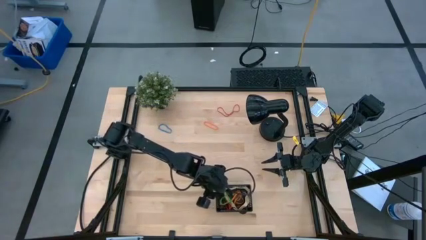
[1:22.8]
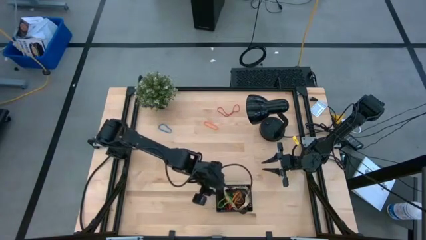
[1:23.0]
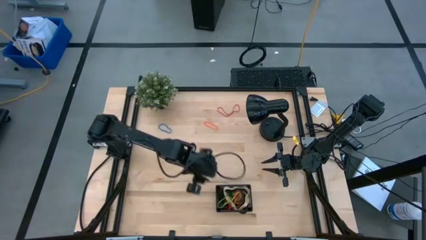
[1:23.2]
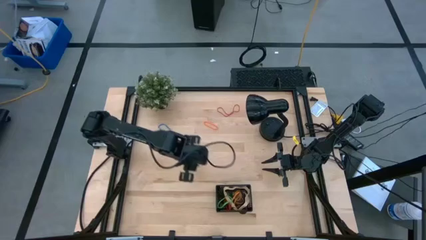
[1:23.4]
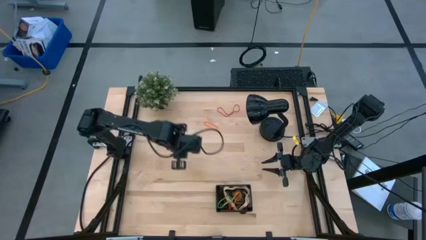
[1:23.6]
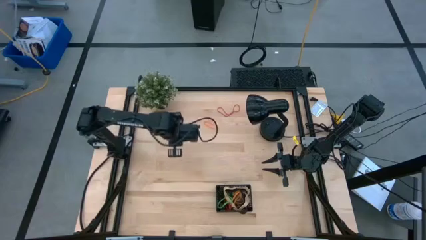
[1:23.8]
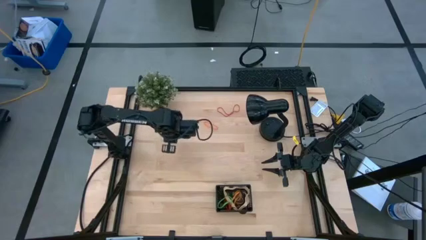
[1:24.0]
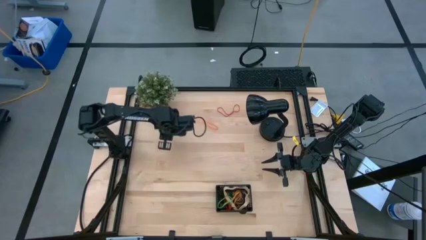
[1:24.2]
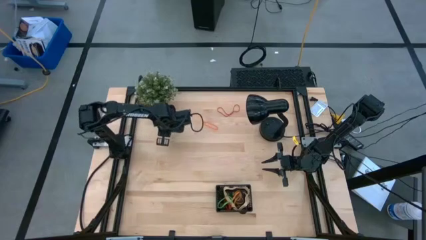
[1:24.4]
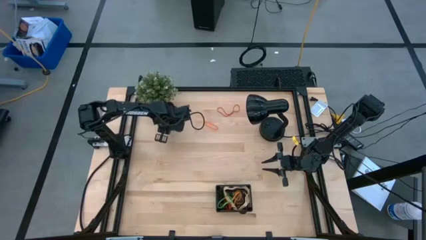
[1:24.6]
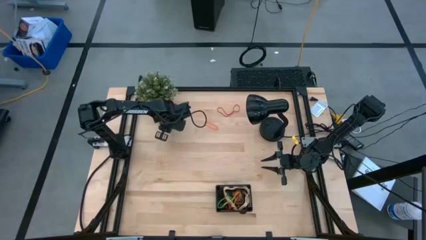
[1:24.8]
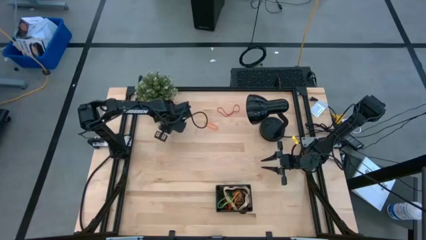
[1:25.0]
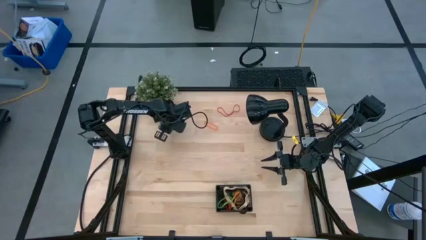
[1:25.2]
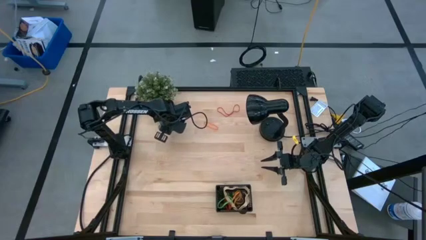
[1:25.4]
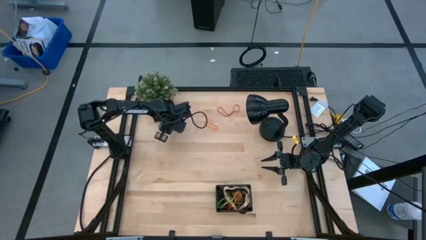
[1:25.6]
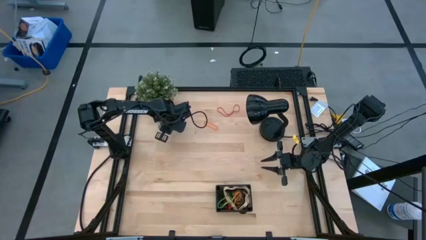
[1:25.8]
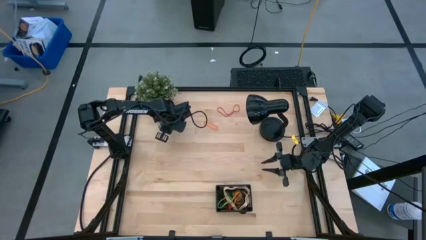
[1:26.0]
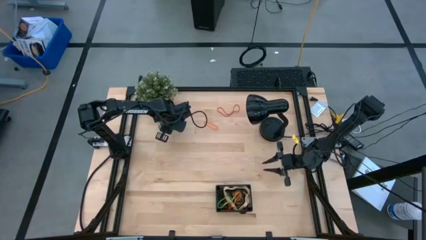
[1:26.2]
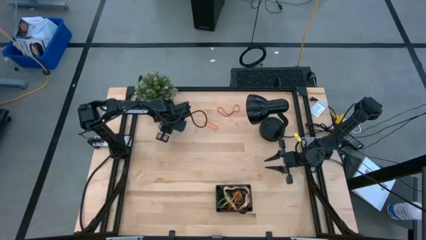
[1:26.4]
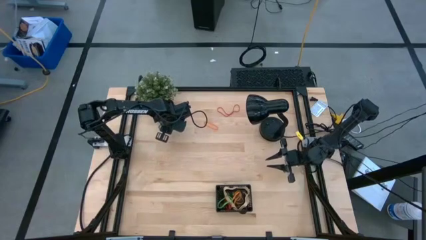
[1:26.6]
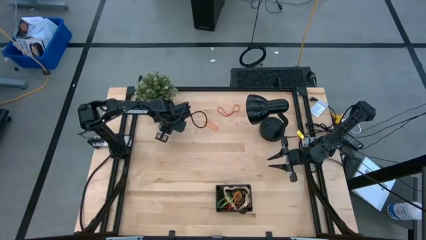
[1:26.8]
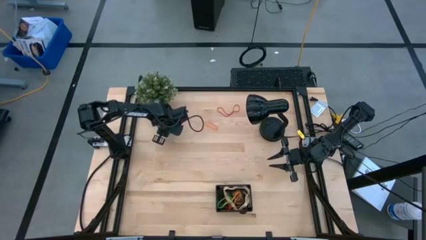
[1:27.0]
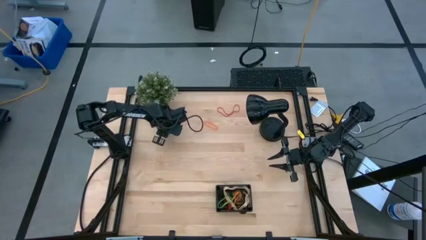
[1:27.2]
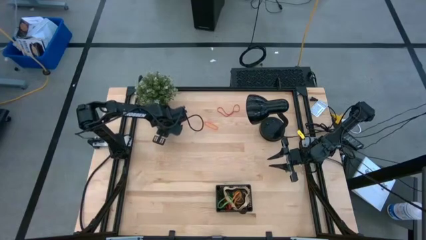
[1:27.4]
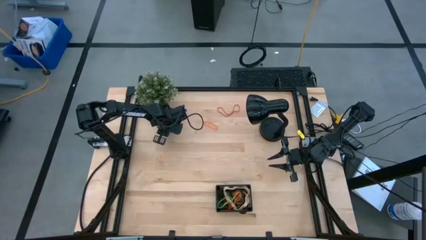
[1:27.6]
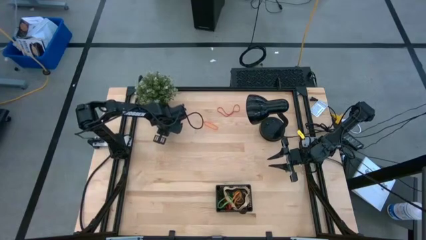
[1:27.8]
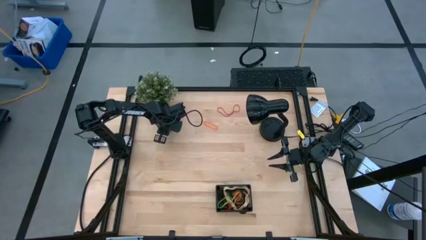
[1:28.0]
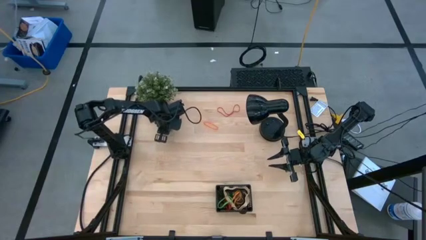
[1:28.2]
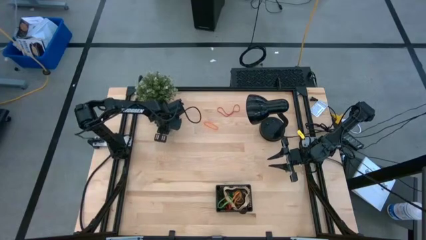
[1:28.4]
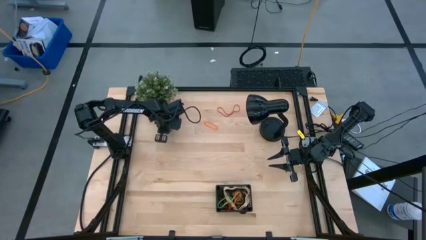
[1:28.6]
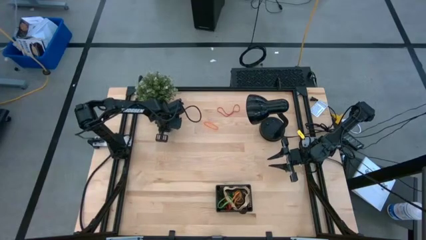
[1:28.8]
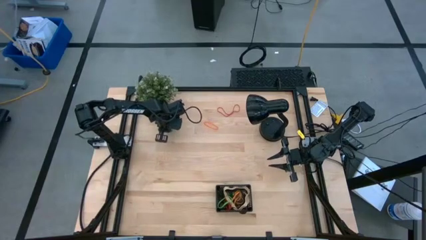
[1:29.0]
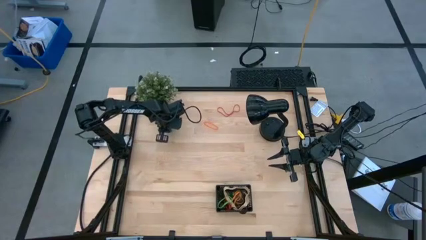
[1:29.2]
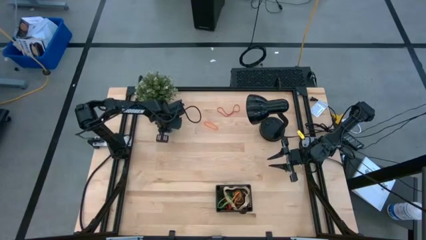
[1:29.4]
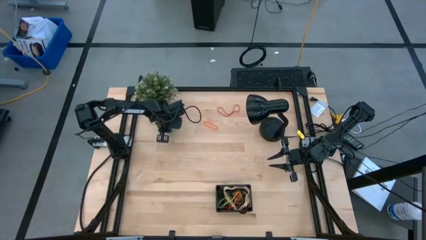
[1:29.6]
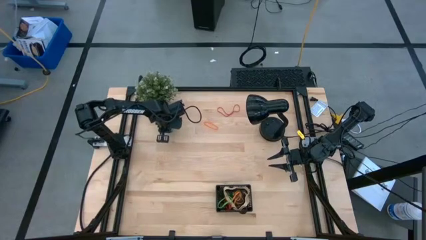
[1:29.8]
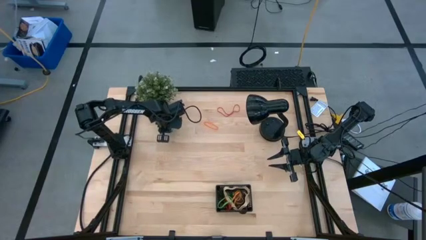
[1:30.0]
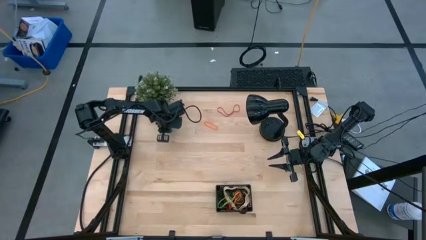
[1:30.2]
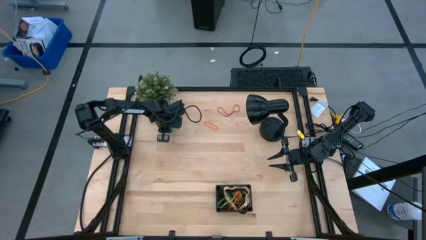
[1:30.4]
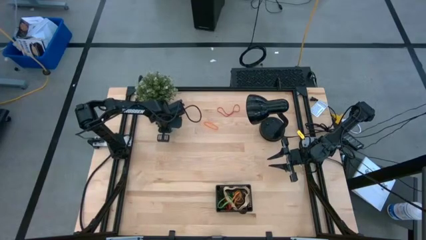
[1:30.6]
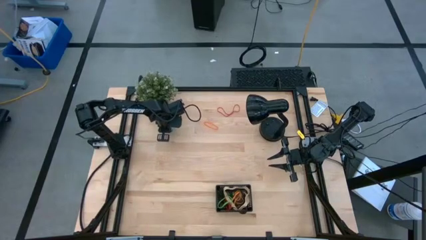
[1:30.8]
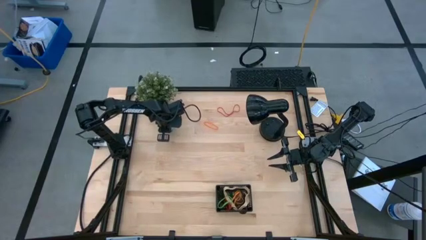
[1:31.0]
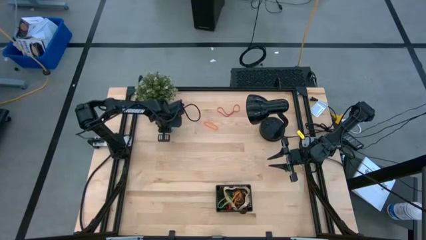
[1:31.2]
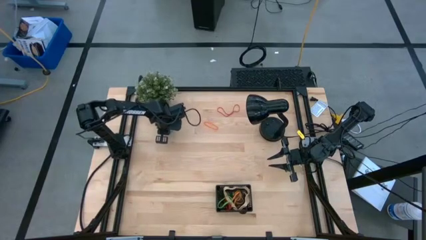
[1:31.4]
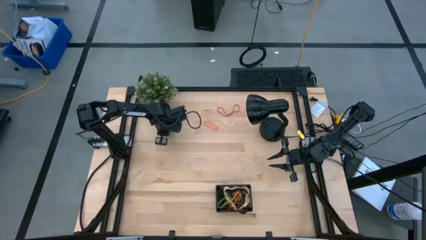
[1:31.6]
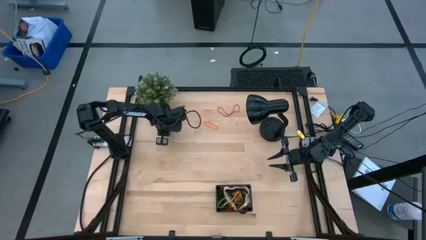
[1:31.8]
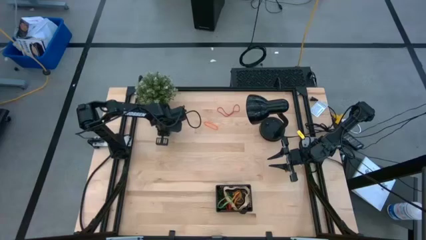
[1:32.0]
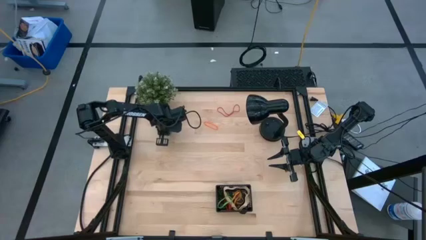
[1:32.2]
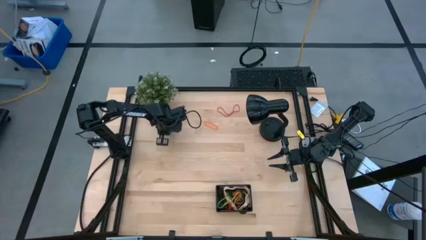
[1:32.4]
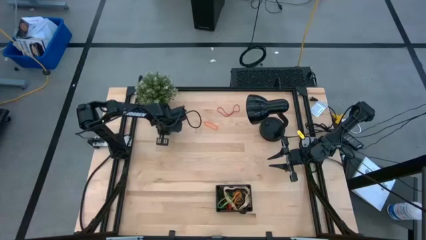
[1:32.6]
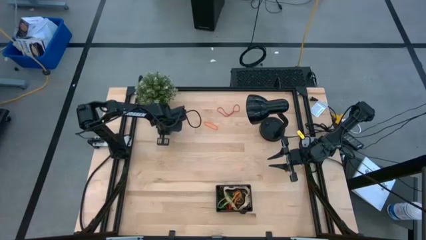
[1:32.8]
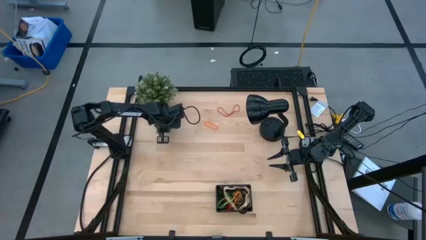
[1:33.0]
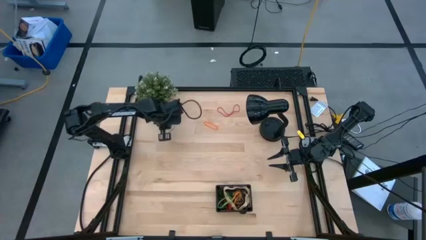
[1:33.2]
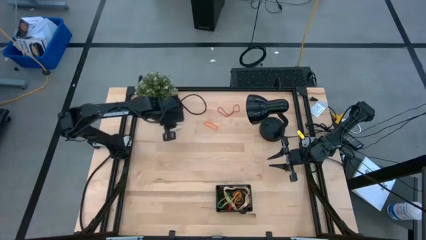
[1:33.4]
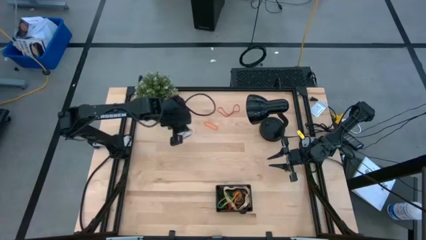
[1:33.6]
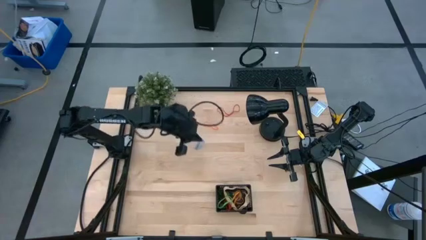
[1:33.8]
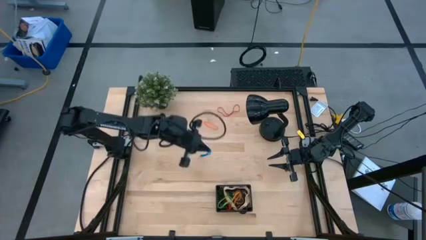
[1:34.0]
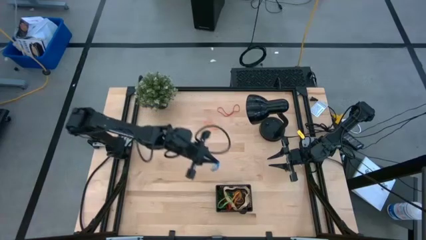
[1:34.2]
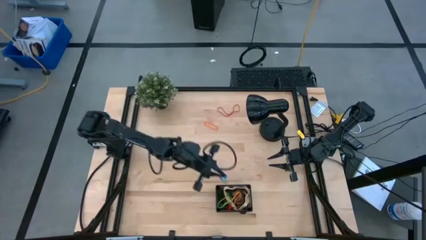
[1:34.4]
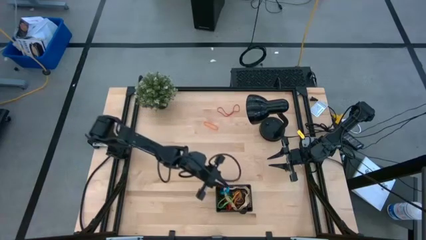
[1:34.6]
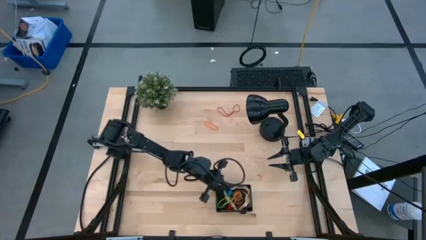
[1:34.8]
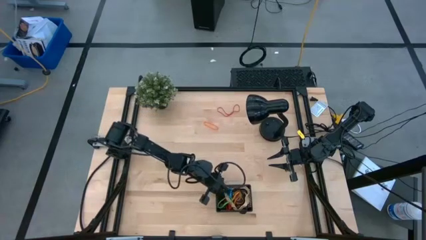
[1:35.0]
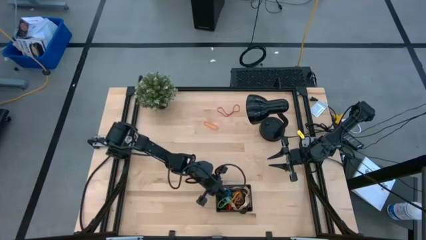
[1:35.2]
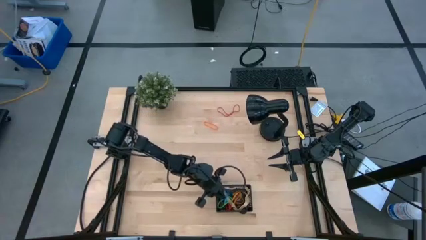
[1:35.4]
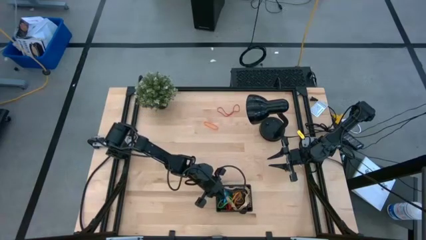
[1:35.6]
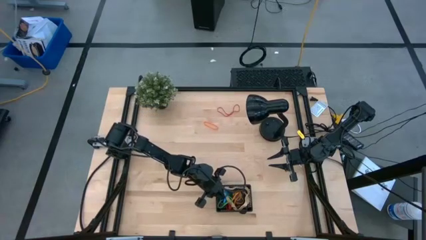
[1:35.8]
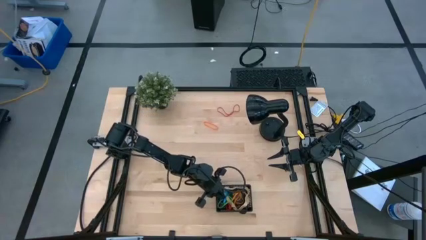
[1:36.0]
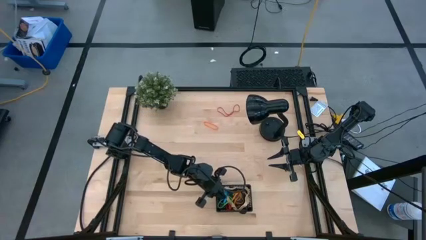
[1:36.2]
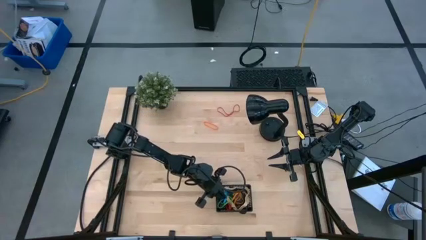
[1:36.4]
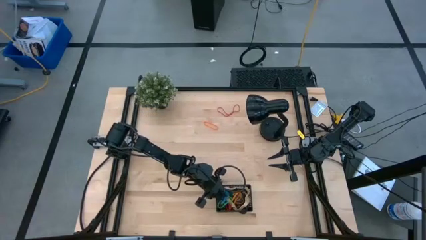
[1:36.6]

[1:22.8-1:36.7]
Task: Pick and place rubber bands into bin
Put the blue rubber band into the black bin

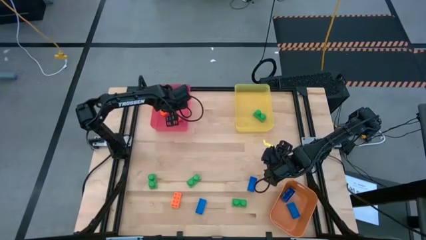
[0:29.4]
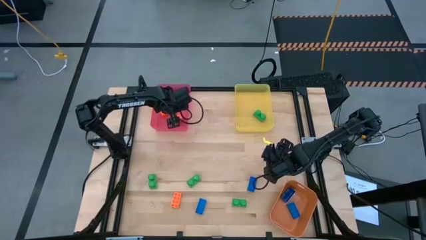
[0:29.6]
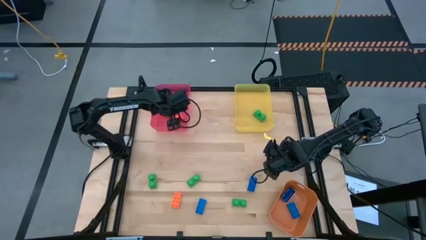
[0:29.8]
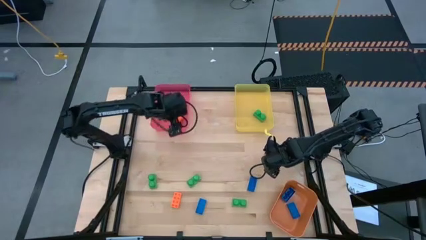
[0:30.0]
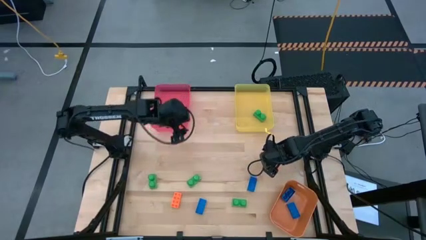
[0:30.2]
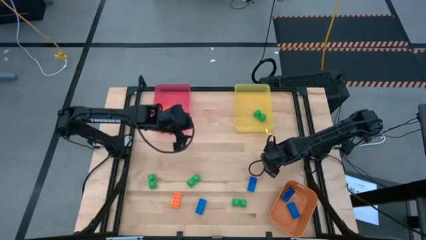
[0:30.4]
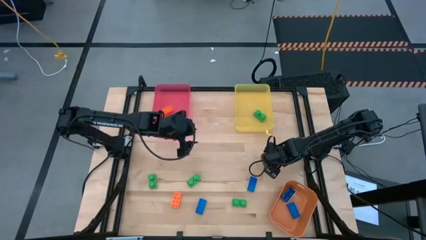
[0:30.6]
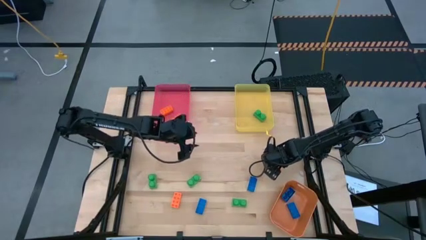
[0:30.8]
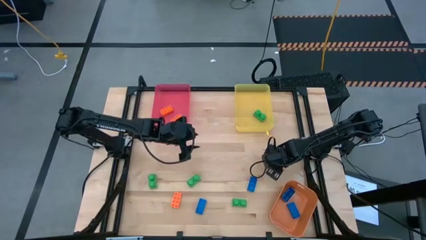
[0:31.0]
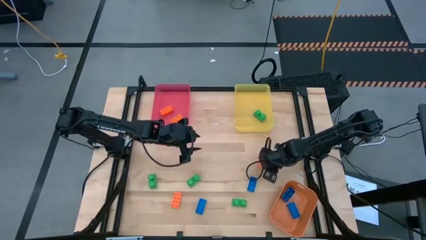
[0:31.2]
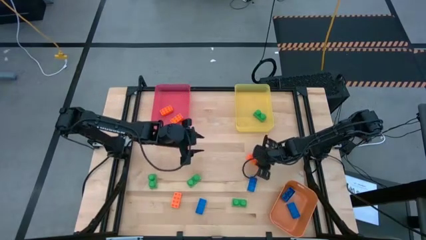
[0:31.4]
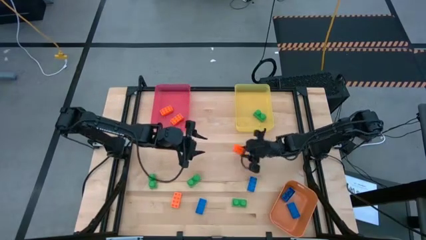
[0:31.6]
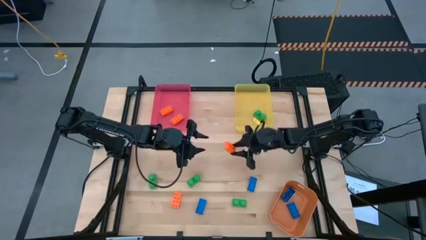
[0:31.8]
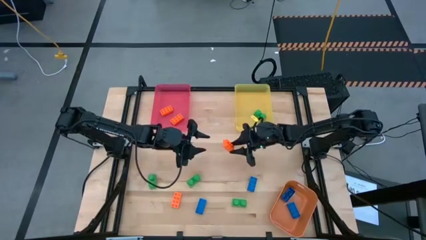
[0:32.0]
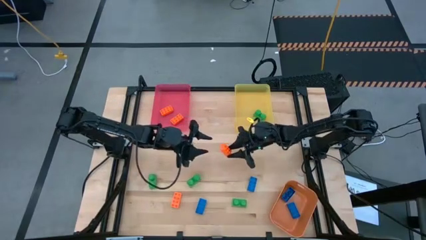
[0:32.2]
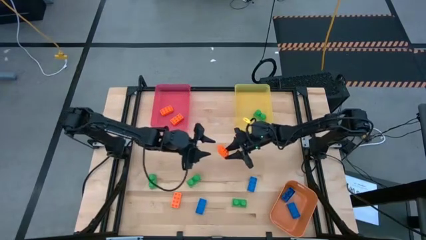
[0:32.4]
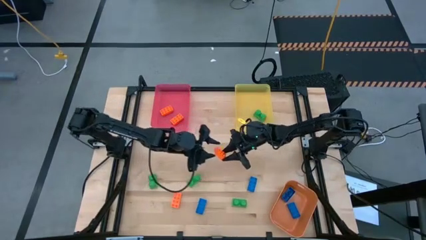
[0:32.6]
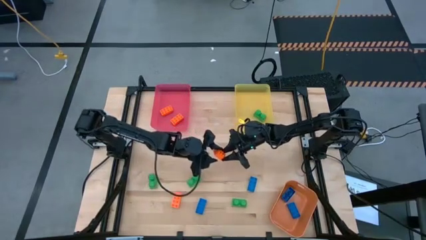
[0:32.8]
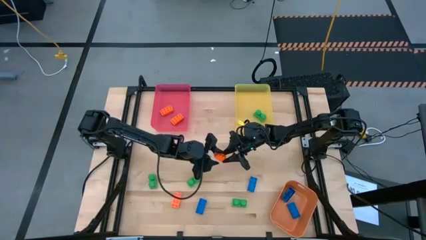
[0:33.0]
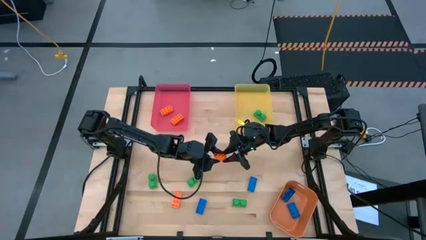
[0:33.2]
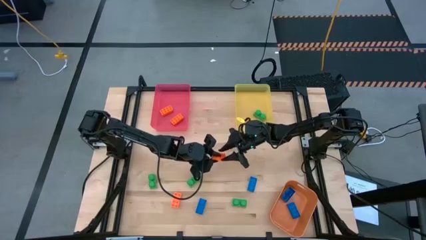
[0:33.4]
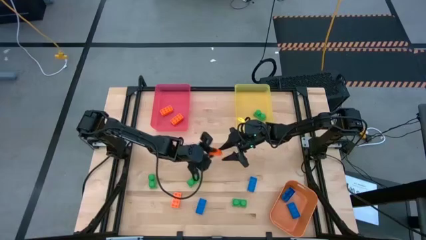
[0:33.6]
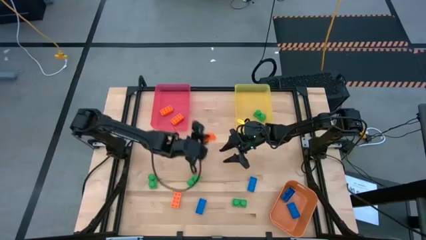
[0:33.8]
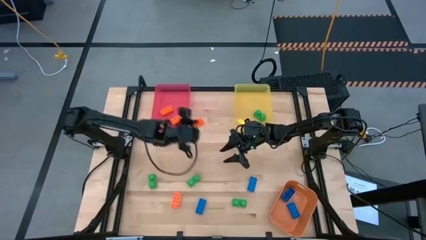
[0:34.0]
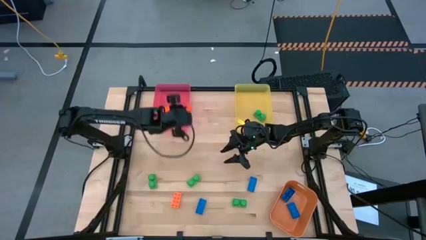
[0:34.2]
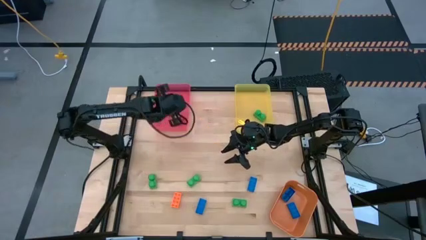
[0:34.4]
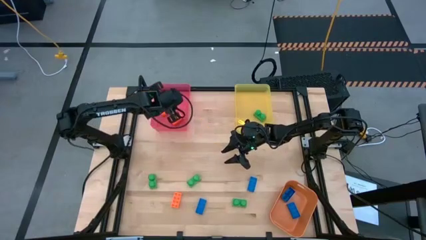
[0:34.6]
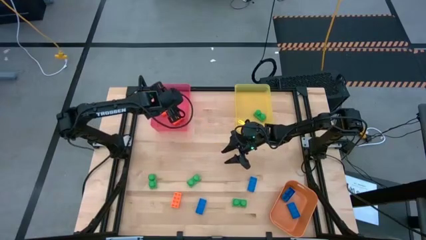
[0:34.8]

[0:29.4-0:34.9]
Task: Sort & place blocks by color
Put the right orange game piece into the red bin
